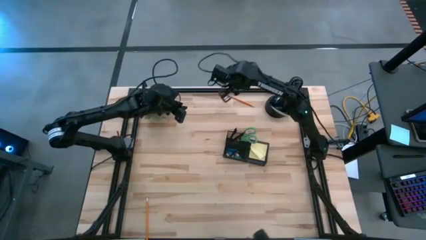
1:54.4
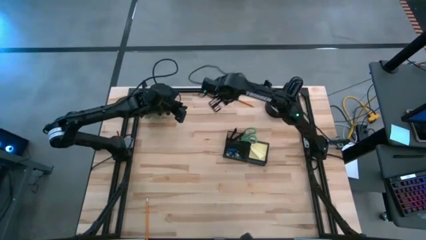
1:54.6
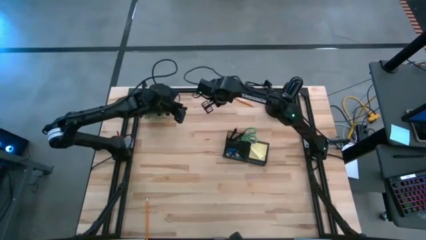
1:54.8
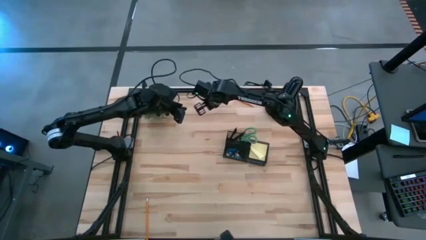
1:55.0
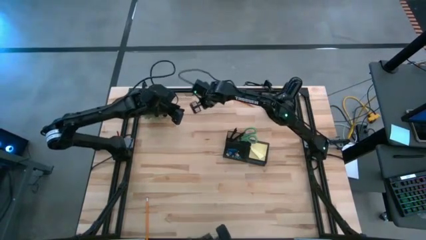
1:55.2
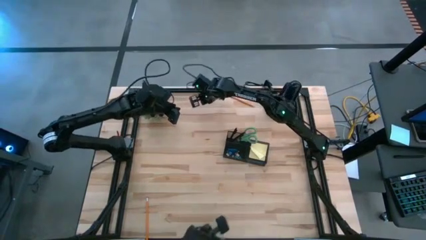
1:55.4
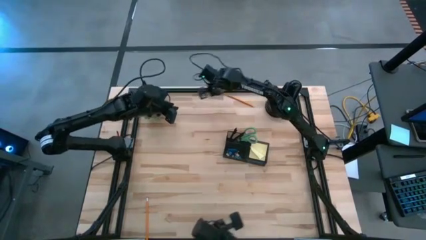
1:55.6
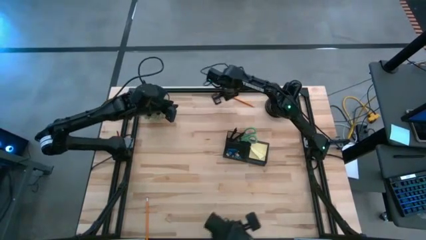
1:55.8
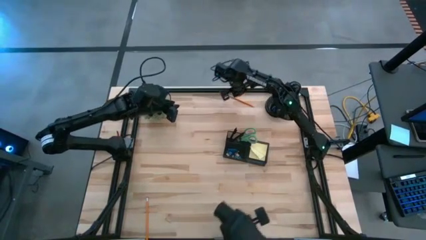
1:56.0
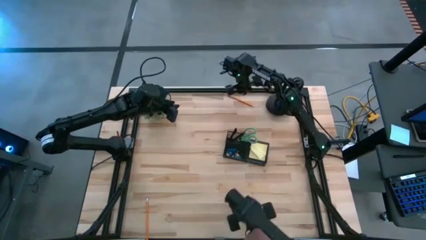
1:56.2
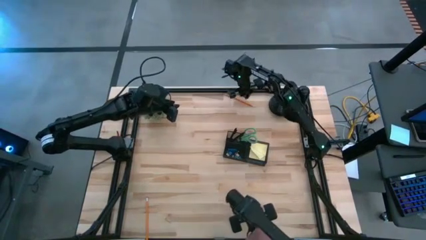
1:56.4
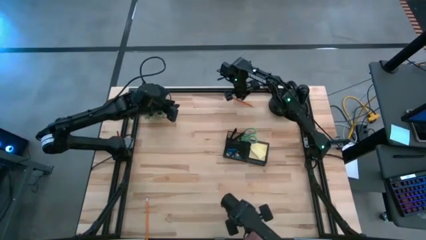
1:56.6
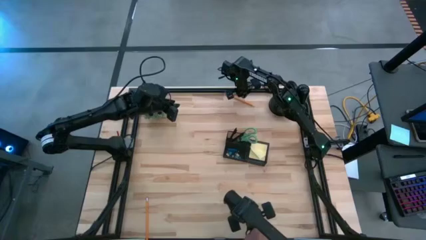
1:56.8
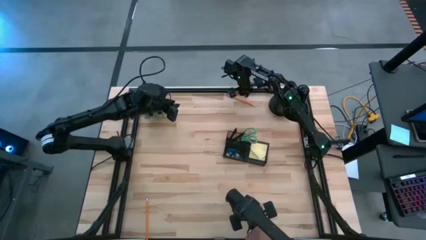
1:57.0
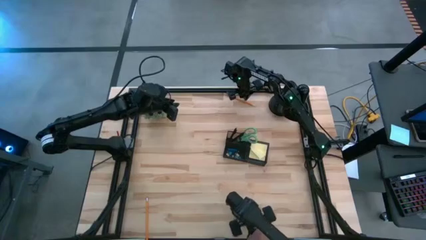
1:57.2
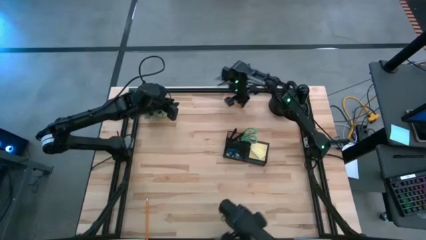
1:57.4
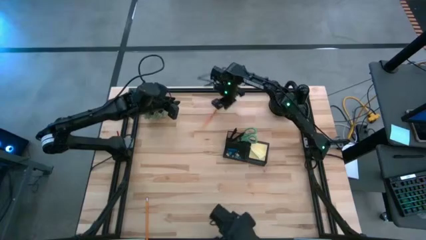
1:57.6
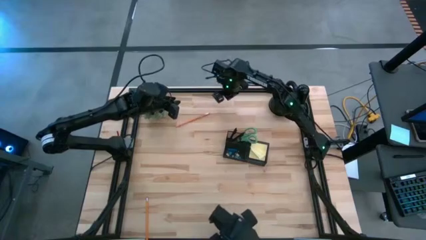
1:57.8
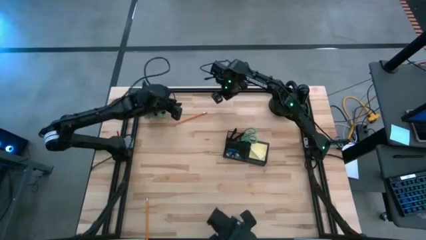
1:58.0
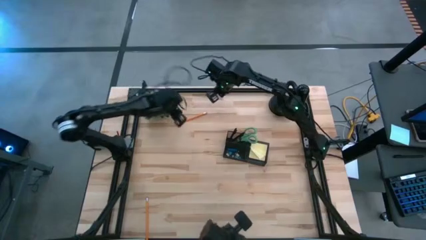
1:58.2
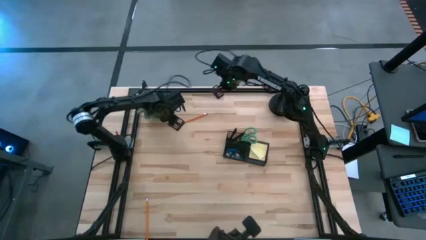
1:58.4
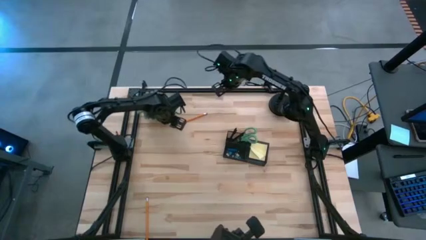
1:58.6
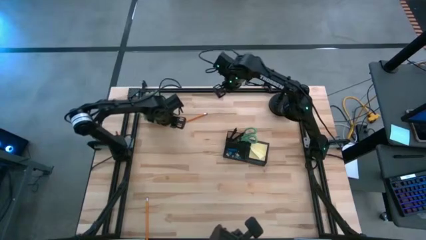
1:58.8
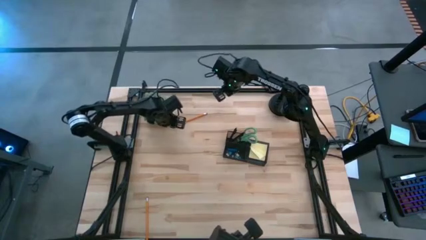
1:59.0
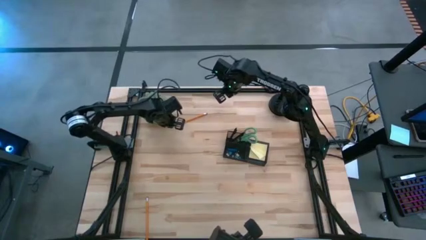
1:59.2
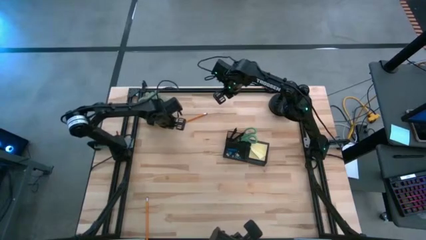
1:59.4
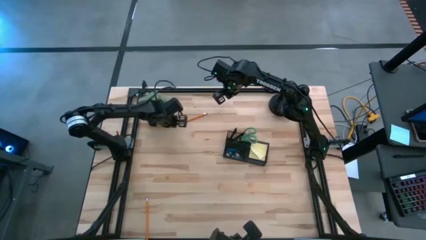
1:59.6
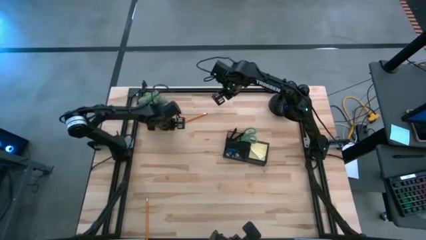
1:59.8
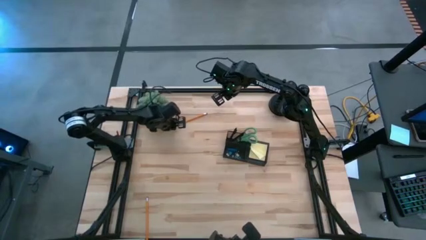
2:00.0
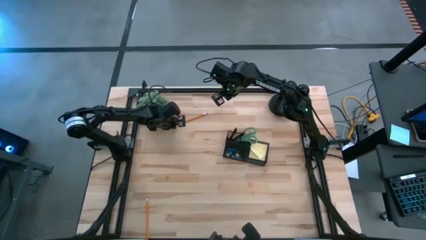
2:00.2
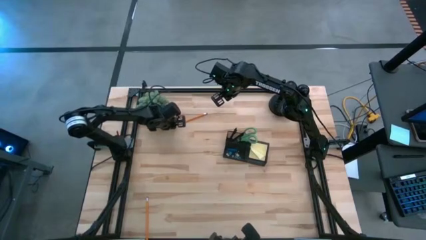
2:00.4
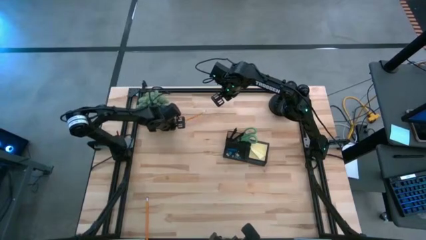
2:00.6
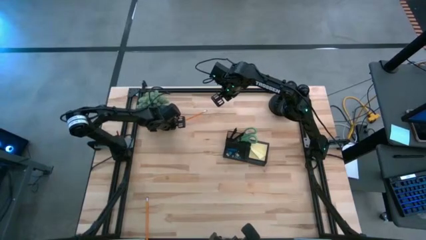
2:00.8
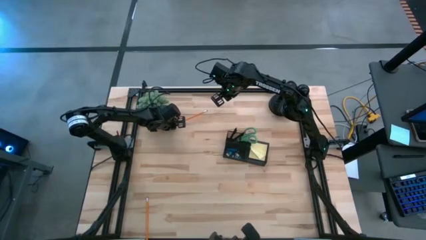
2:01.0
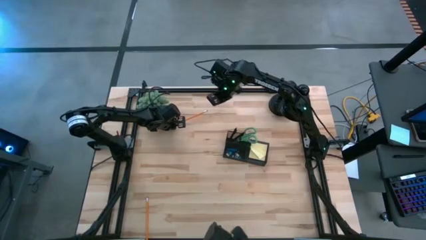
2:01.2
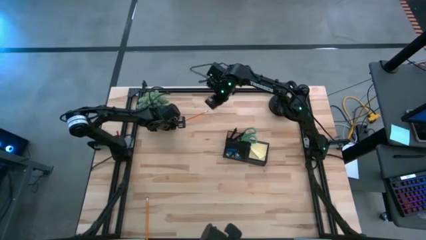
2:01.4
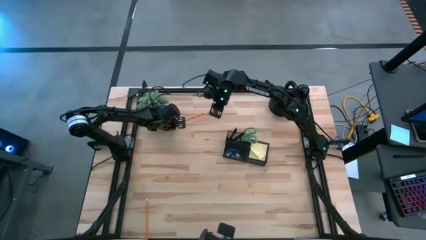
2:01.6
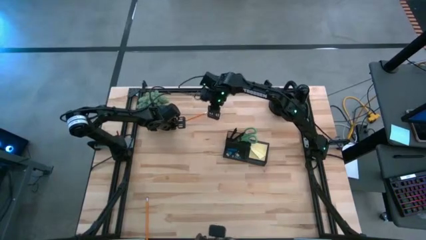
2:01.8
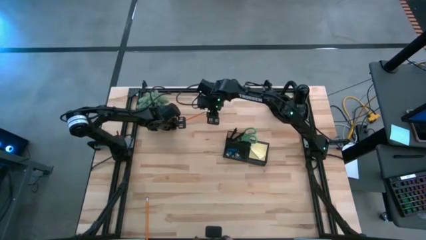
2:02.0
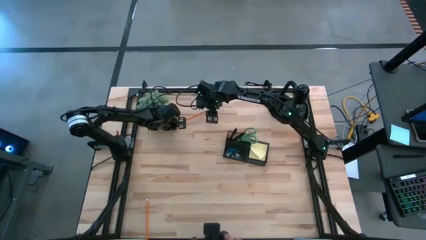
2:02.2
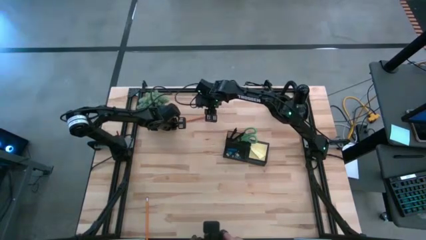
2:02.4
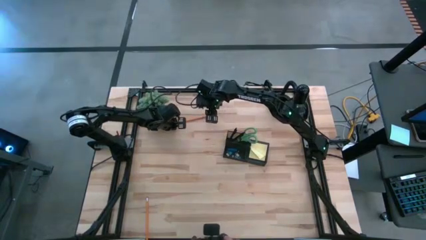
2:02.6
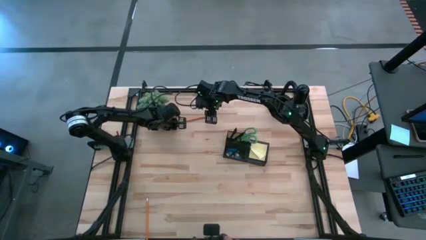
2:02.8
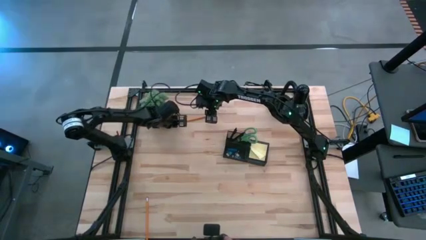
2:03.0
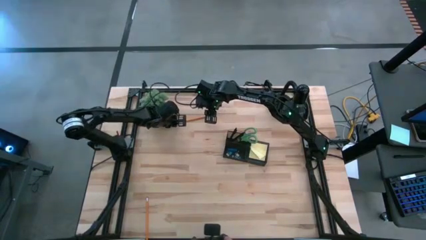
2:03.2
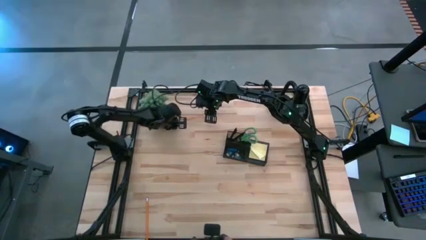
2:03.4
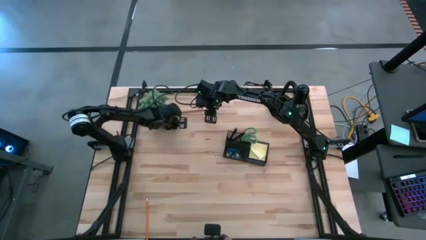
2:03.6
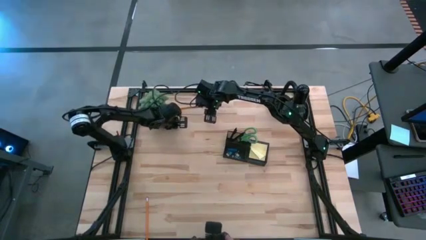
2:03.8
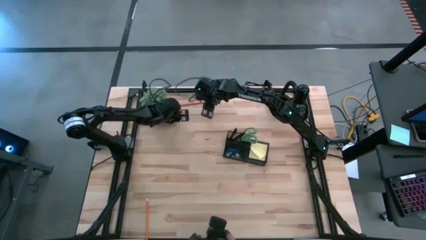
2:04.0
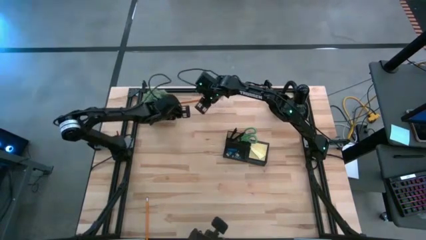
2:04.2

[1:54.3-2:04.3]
Task: Pick and place office supplies into organizer
Put the right orange pencil into the black mesh organizer

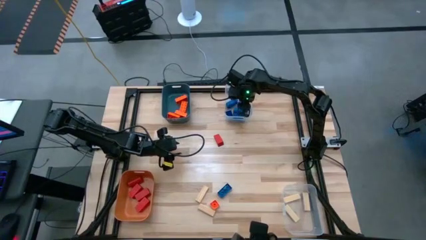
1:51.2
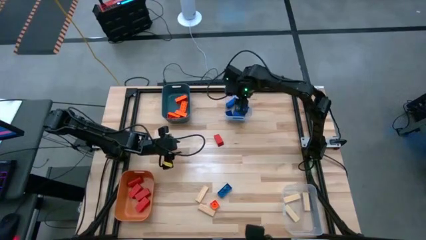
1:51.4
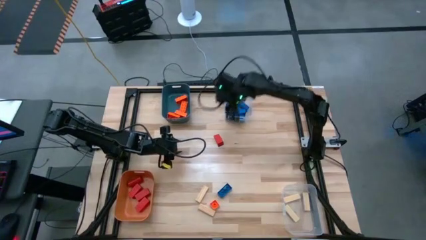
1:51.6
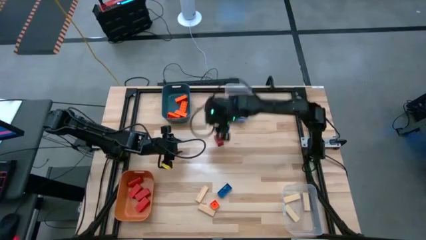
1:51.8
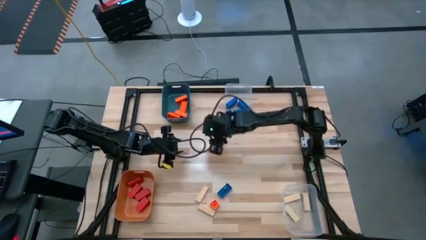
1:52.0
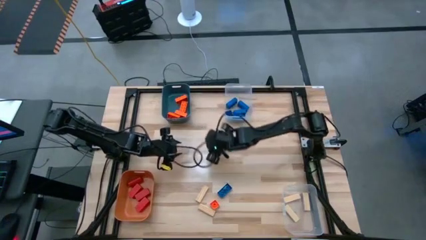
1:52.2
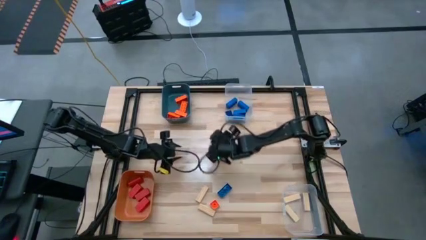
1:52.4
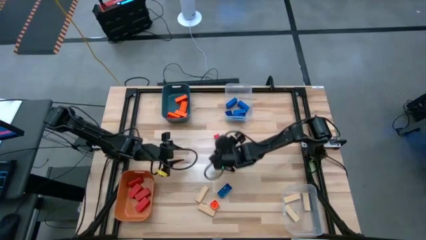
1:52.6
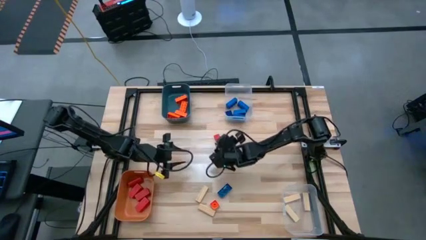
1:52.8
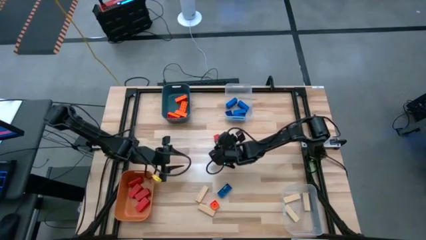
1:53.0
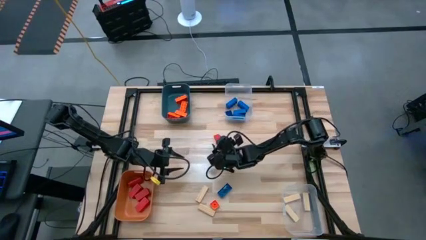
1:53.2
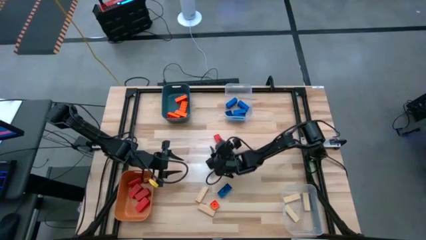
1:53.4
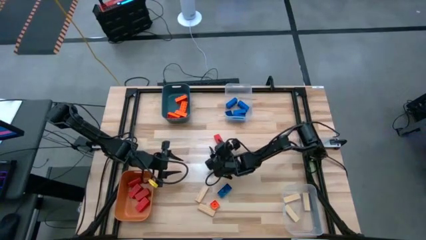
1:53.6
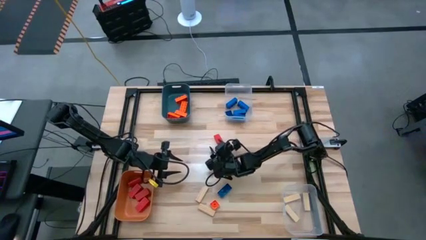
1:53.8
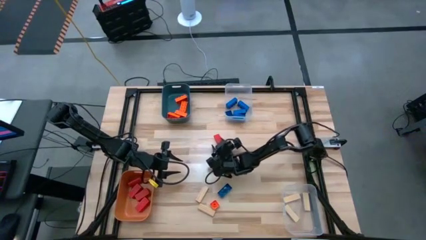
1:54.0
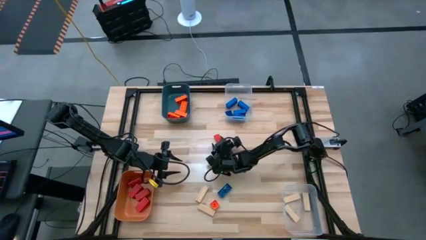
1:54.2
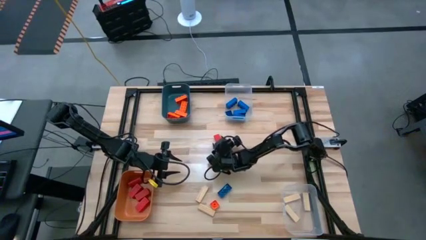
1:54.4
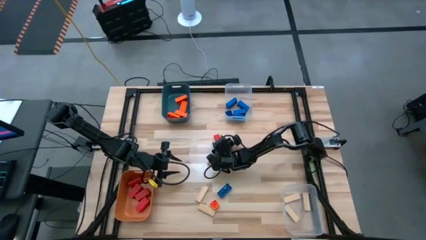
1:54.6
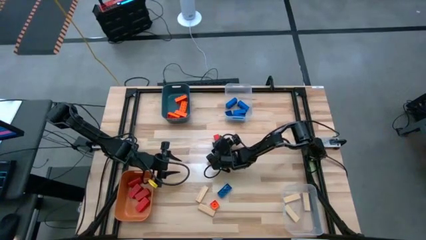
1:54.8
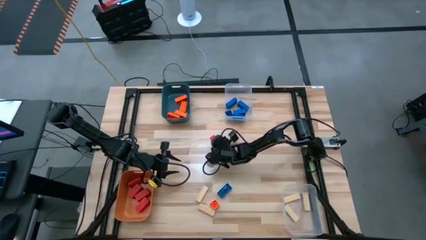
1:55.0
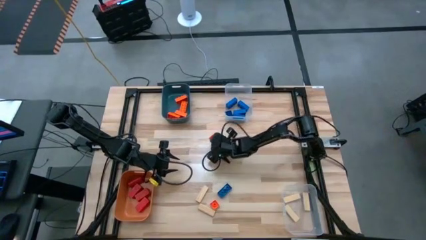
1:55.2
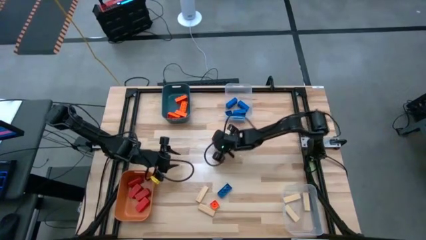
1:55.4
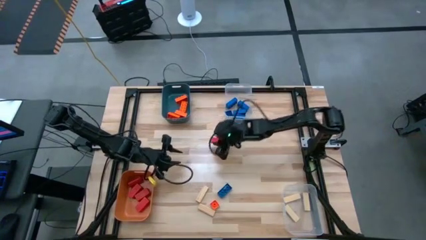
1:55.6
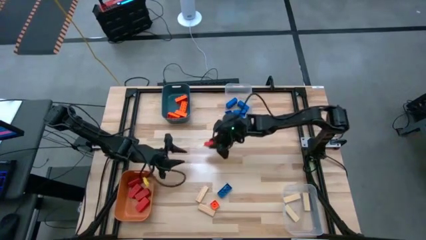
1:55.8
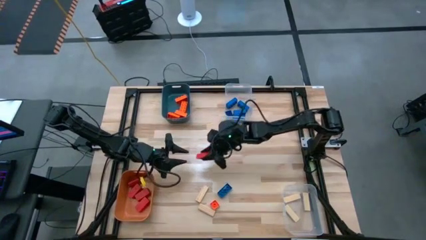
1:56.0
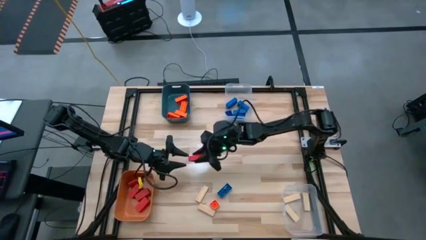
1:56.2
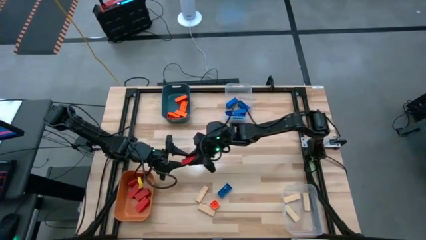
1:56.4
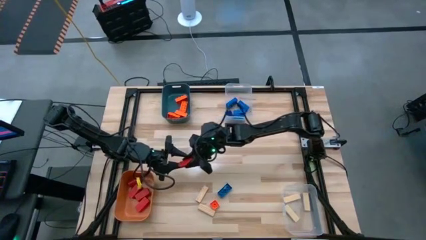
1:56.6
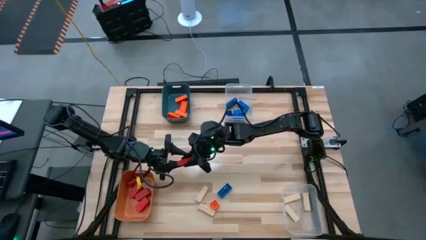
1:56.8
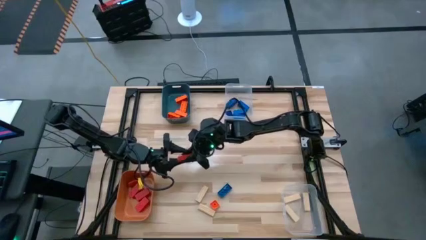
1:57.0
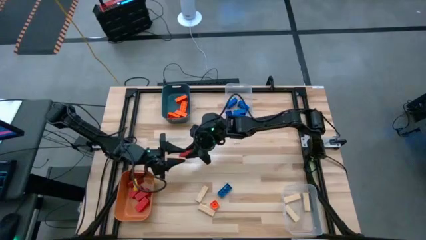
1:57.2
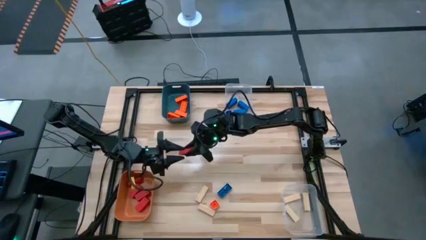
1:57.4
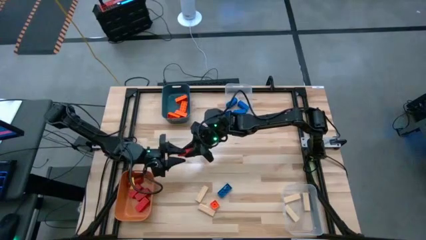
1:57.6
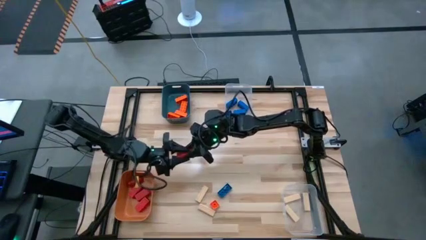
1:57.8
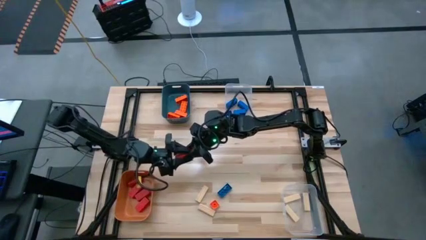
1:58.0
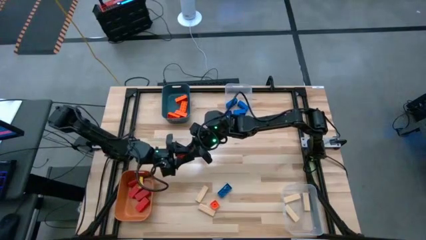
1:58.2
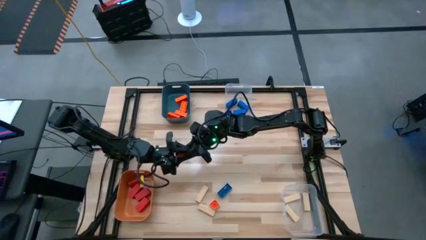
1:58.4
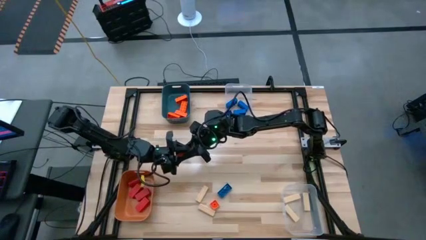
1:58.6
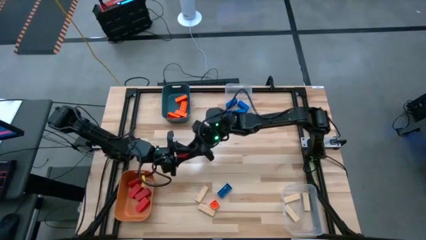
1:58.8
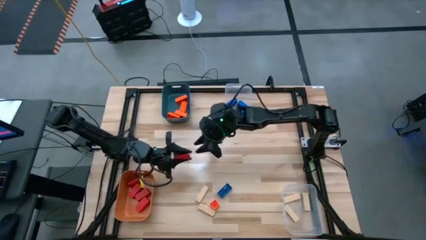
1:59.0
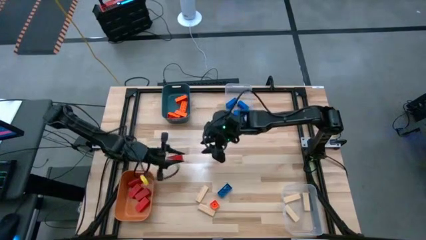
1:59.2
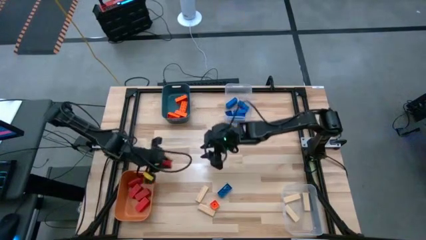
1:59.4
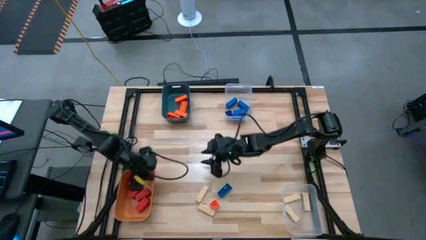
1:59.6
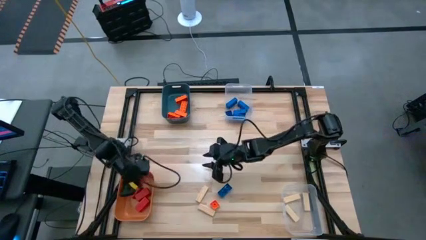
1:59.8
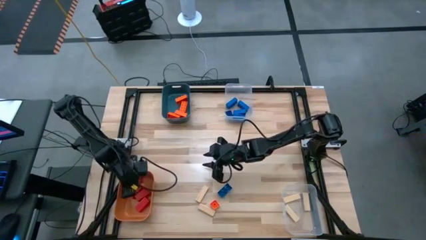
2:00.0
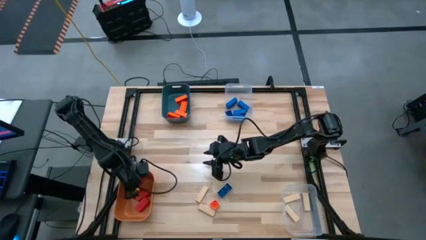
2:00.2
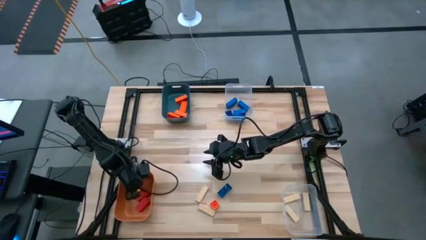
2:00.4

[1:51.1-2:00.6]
Task: Sort blocks
Put the red block into the orange bin
